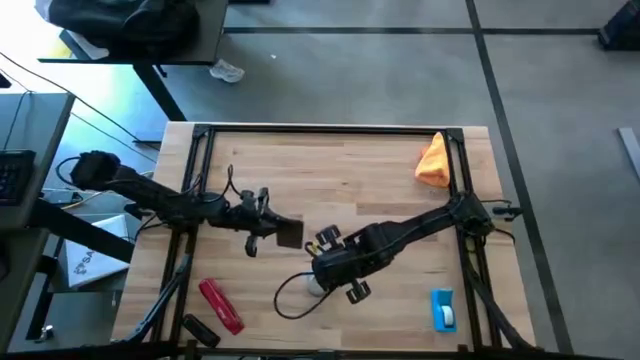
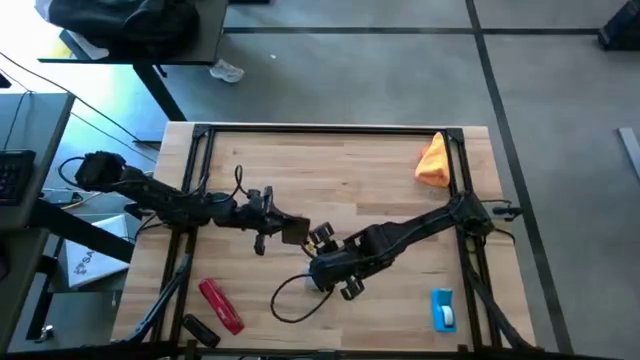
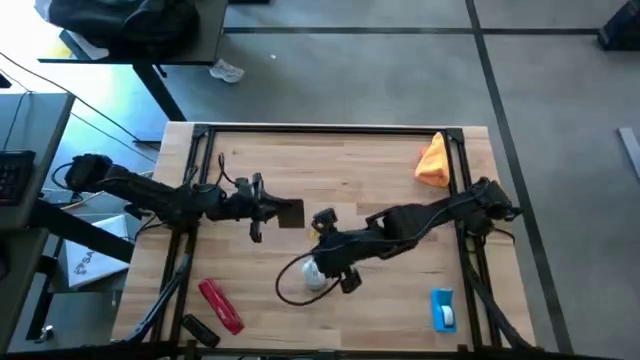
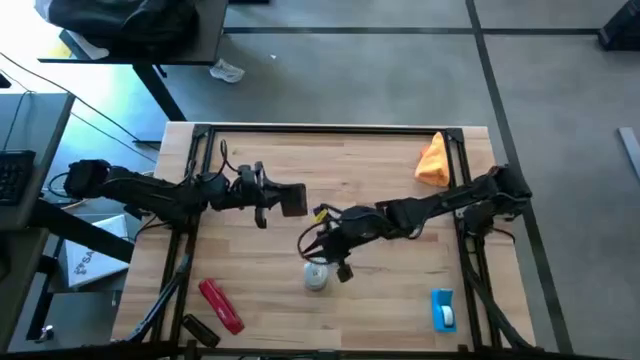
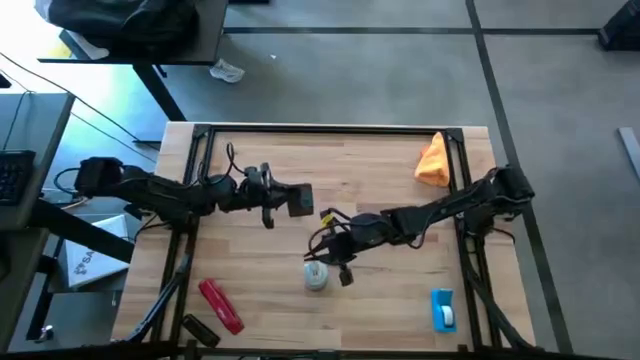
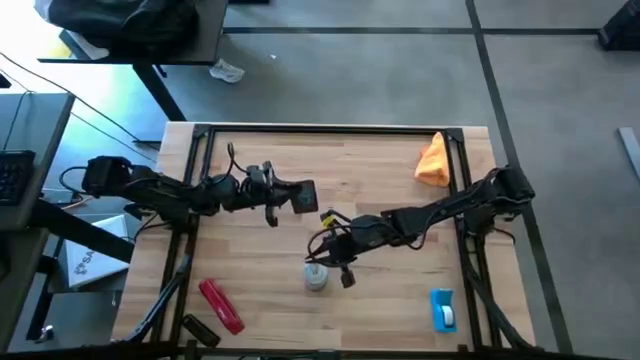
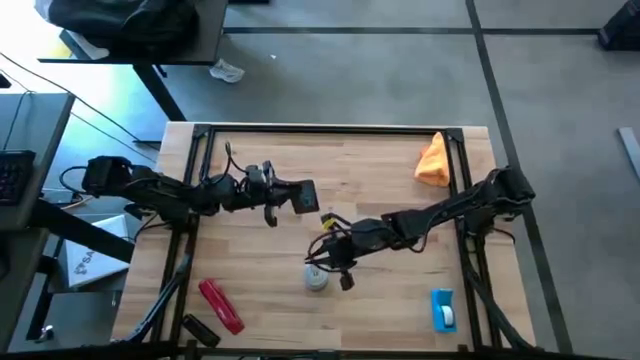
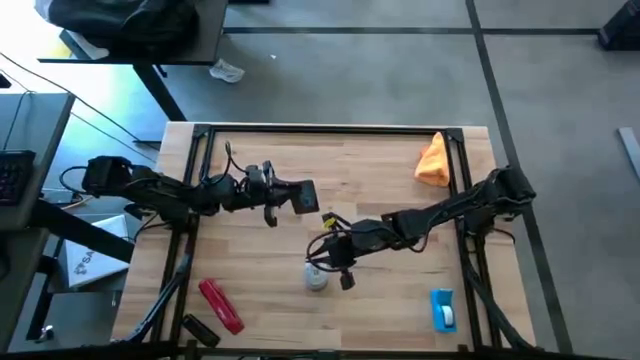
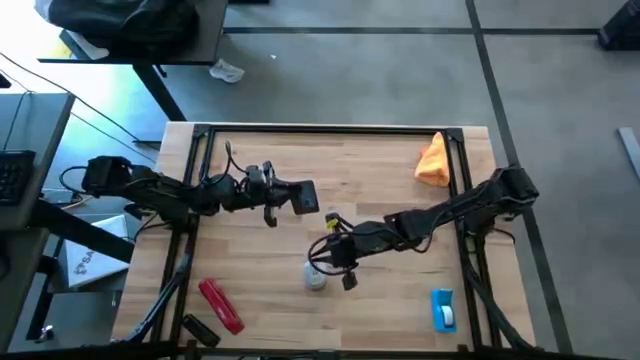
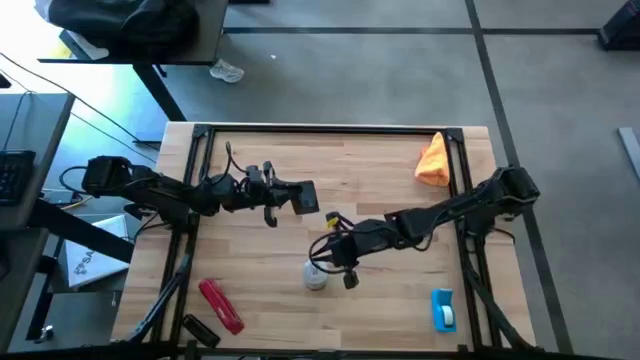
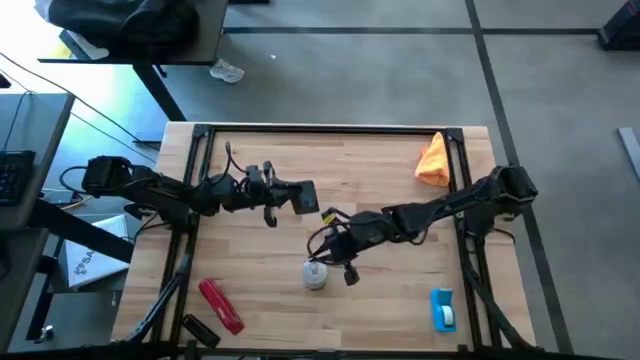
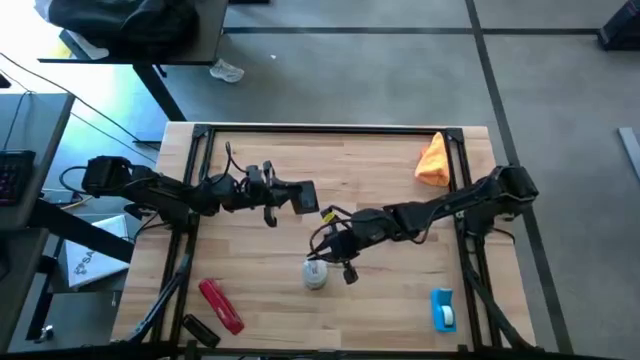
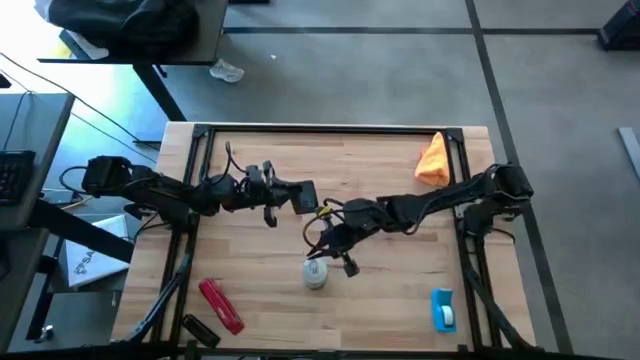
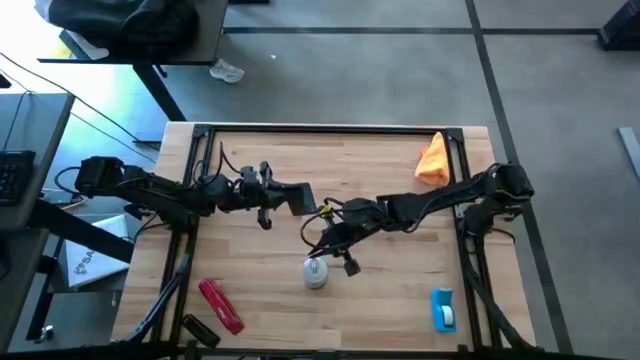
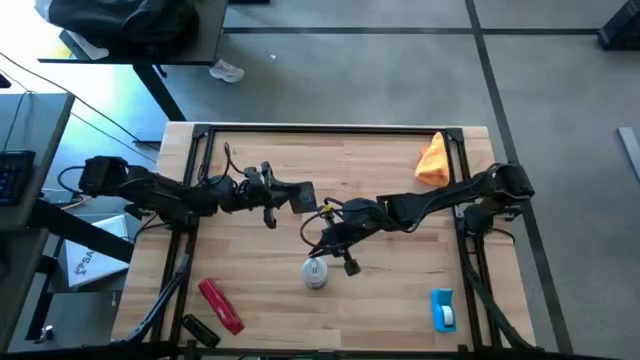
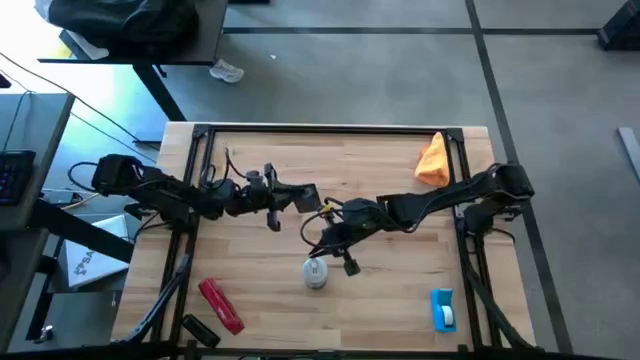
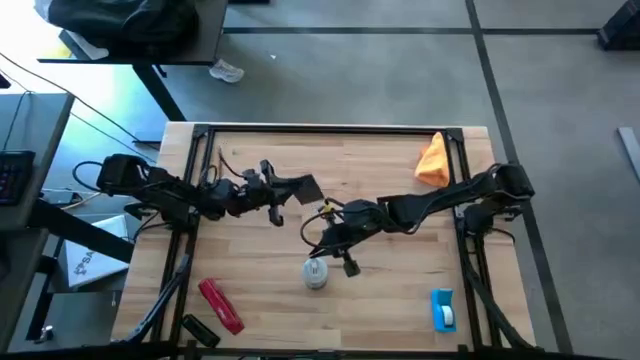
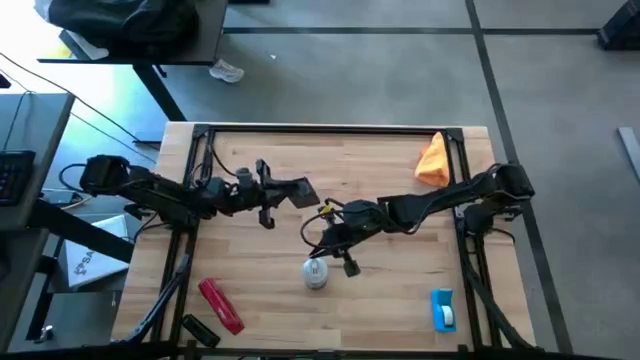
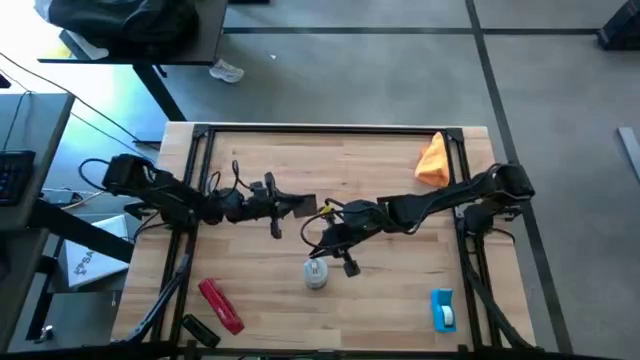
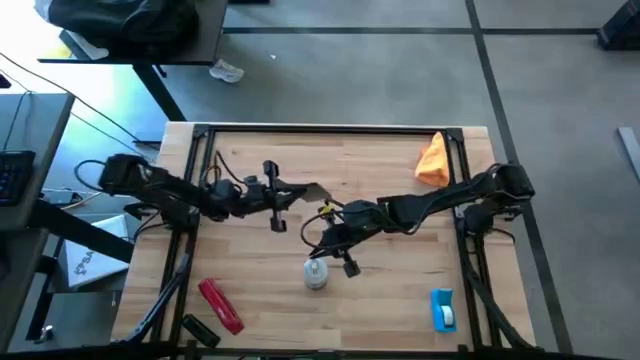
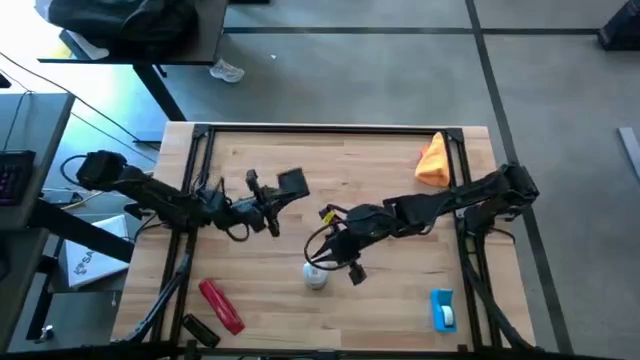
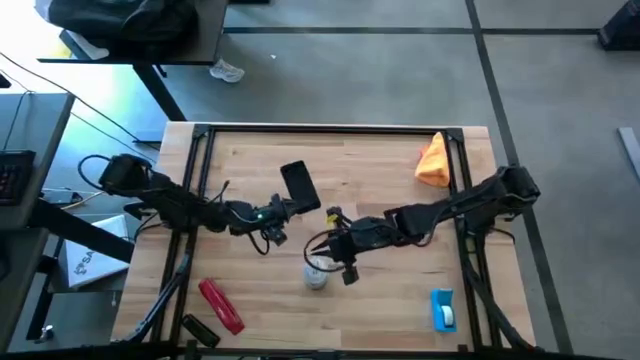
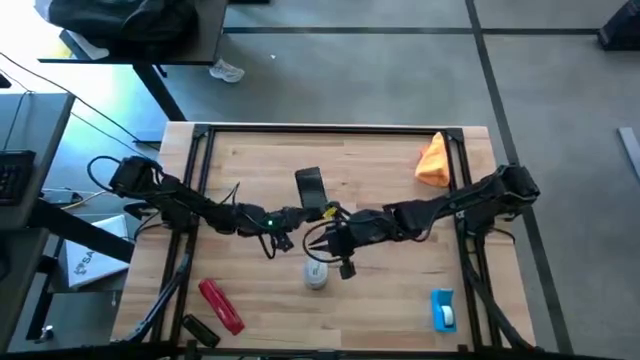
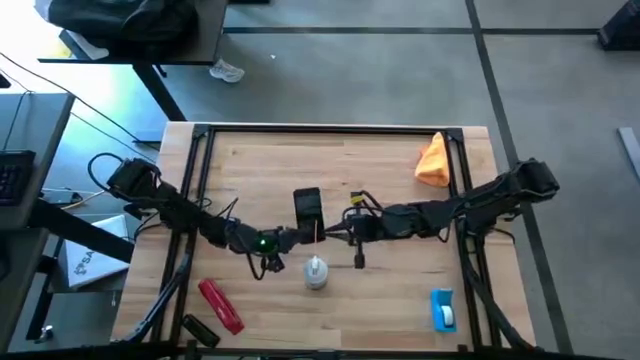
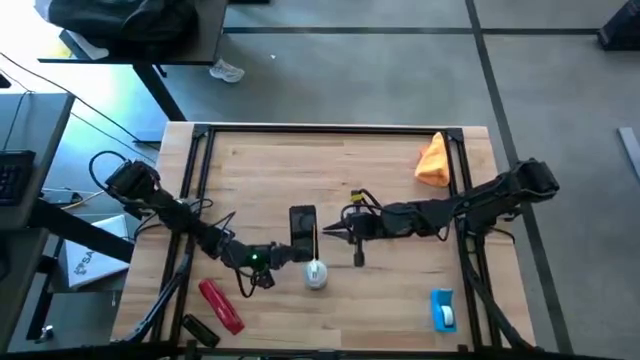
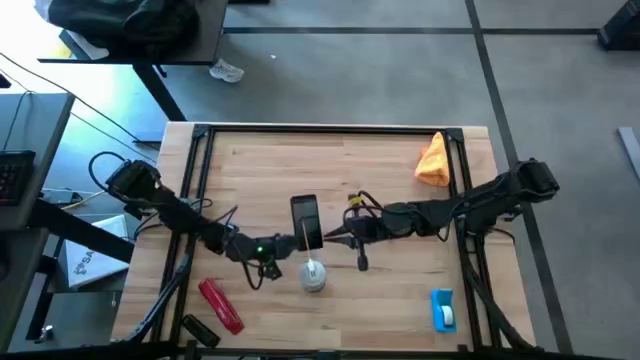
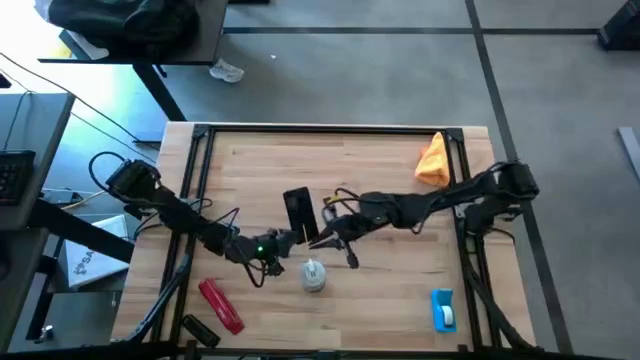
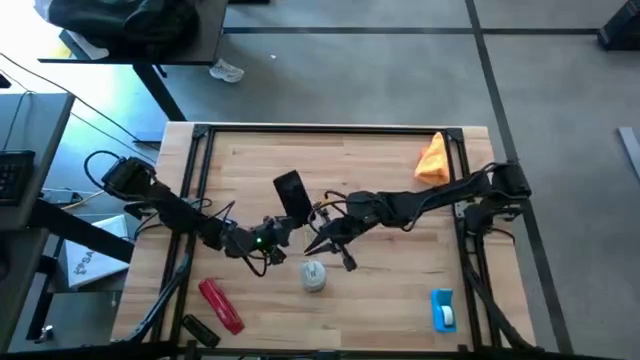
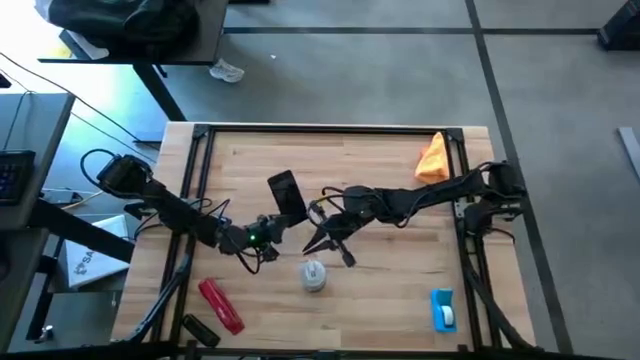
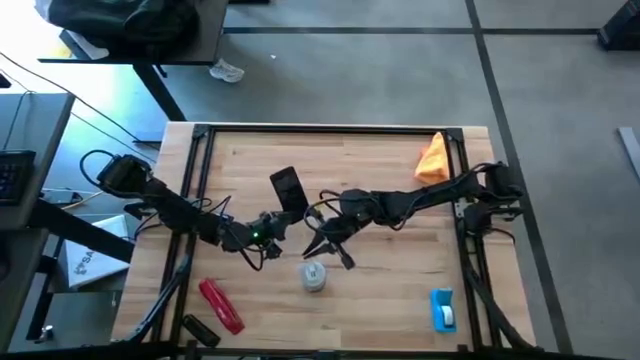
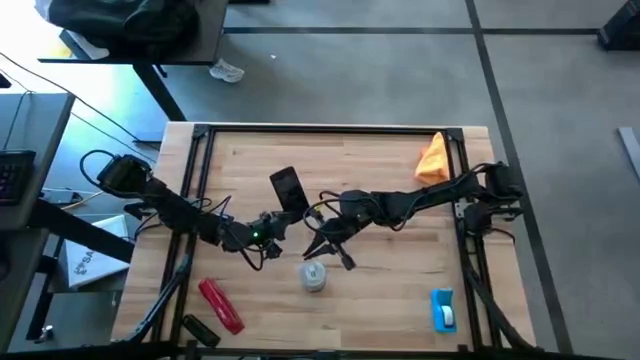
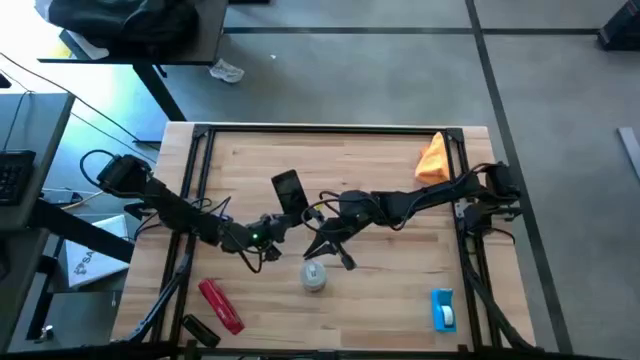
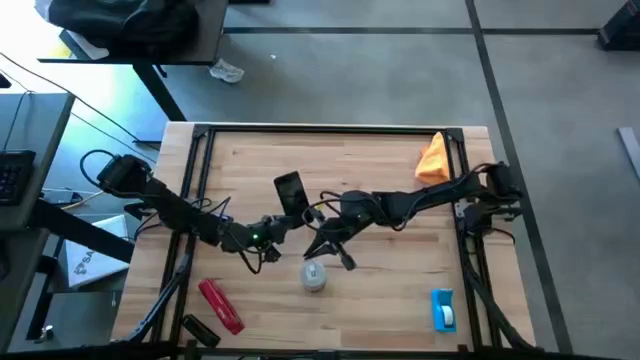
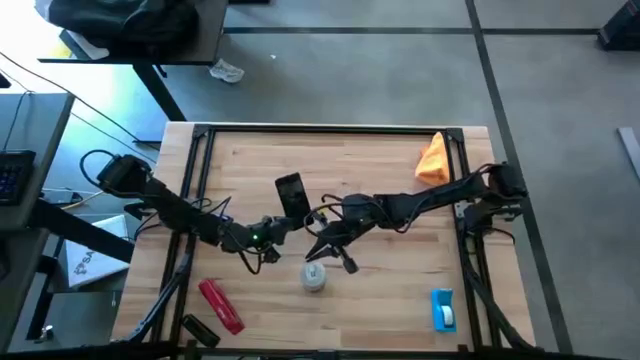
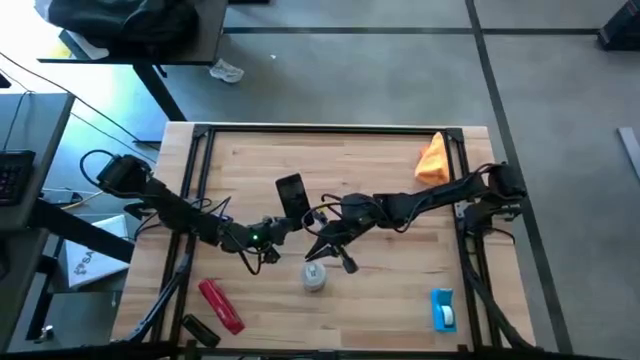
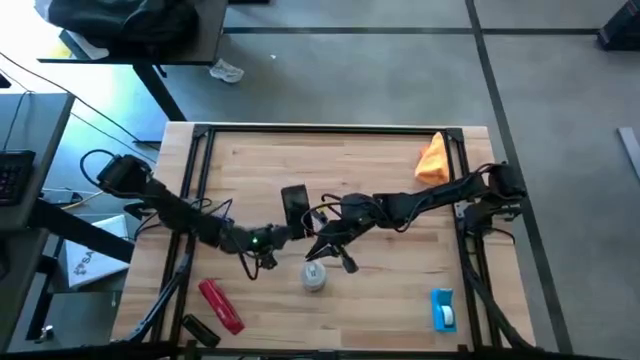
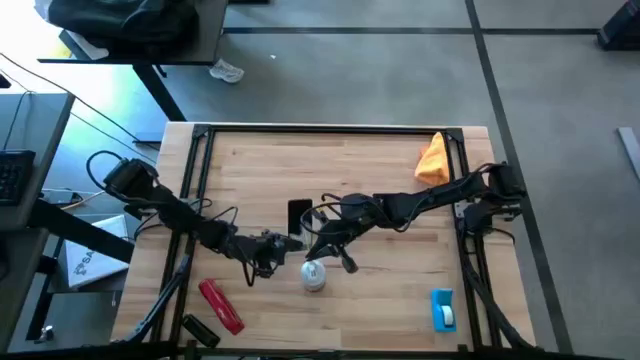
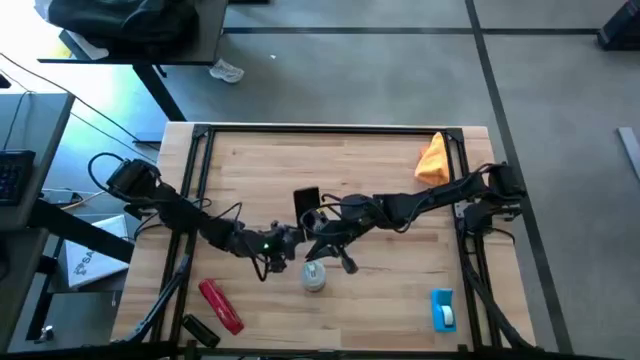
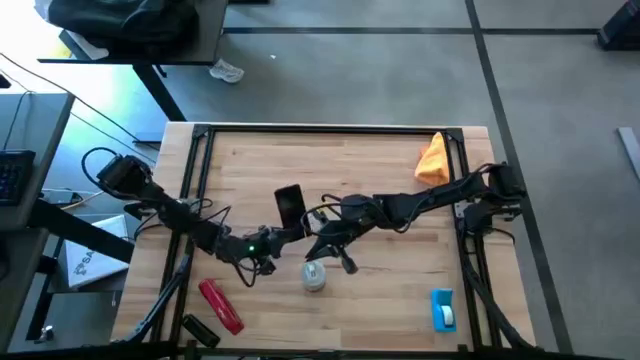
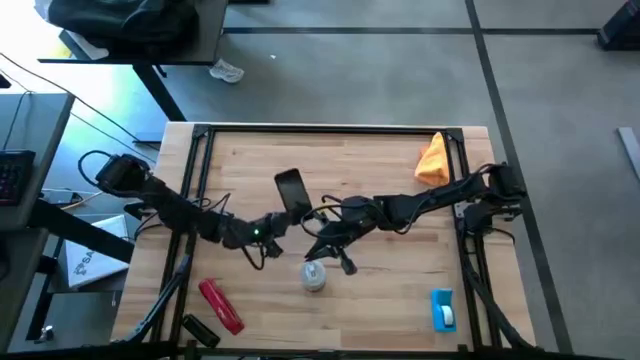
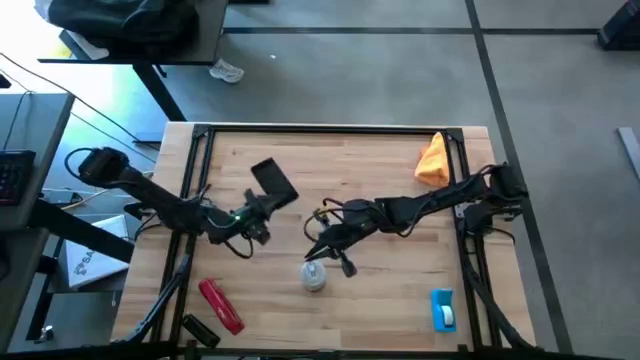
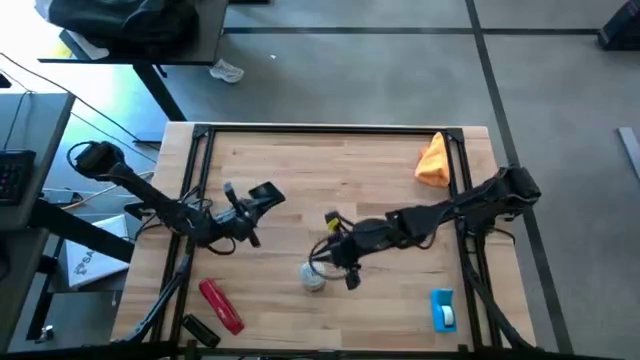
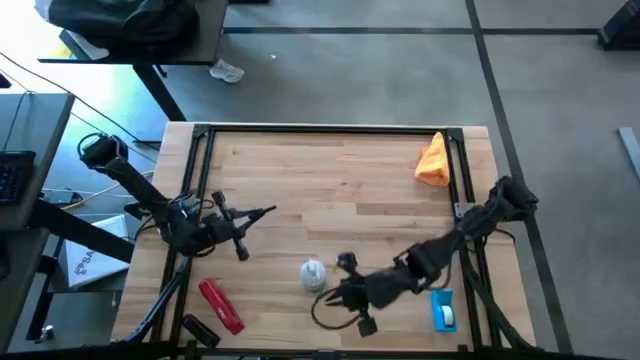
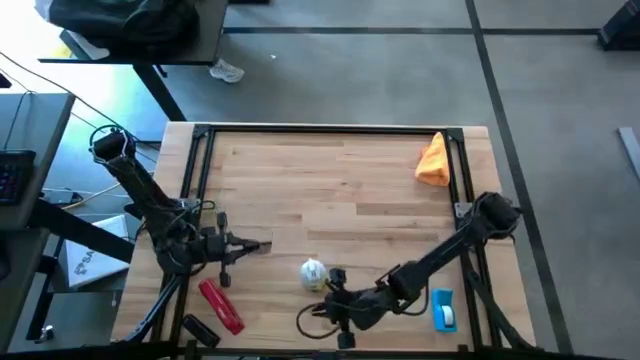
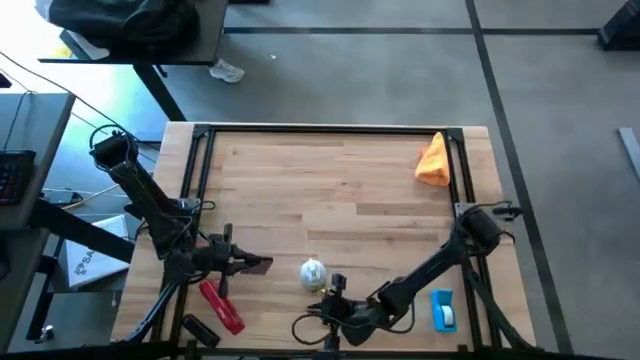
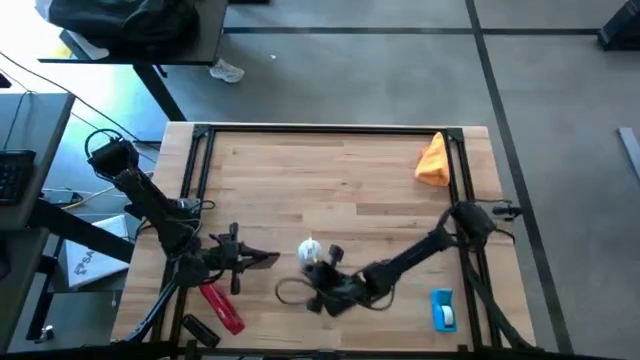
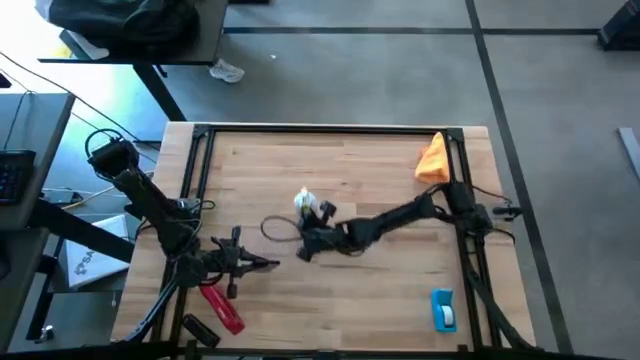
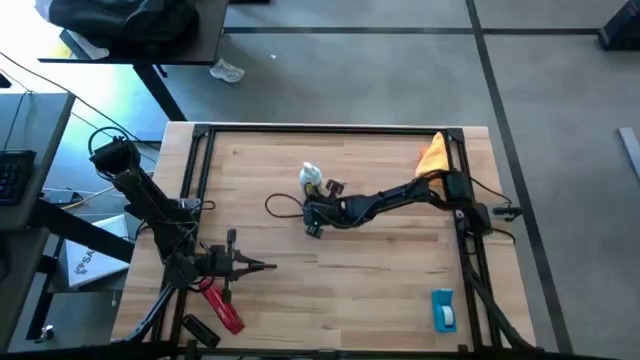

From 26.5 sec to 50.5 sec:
Task: Apply microfiber cloth
Spray the front and back of the cellphone using a spray bottle
